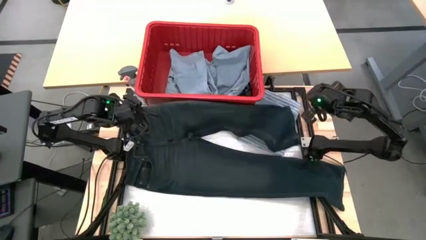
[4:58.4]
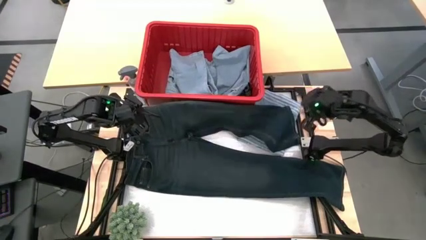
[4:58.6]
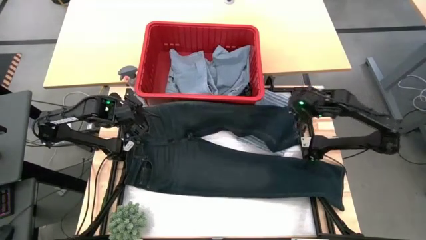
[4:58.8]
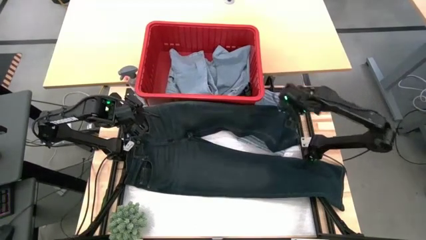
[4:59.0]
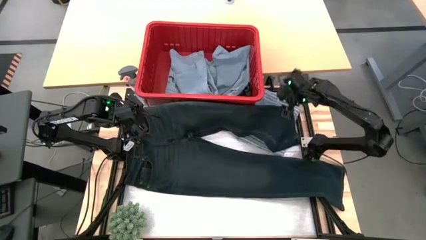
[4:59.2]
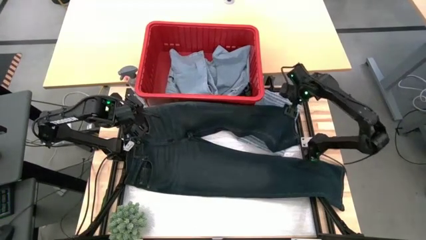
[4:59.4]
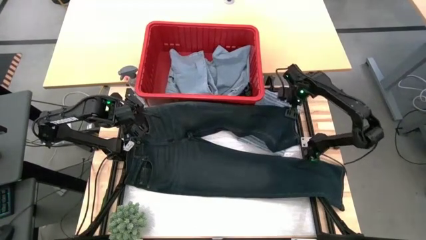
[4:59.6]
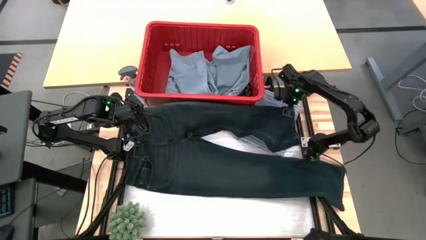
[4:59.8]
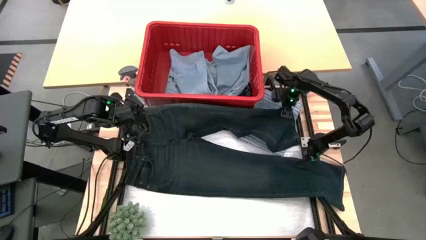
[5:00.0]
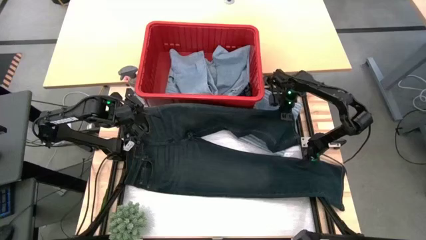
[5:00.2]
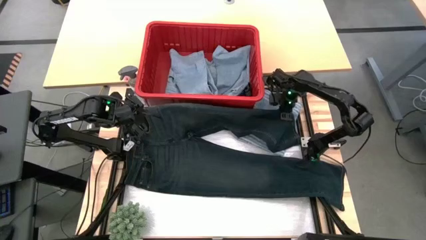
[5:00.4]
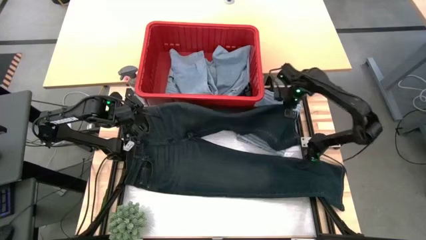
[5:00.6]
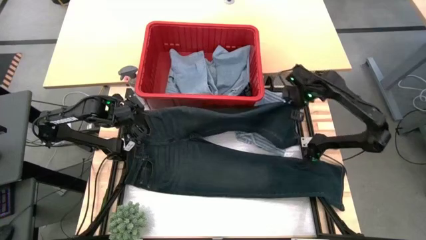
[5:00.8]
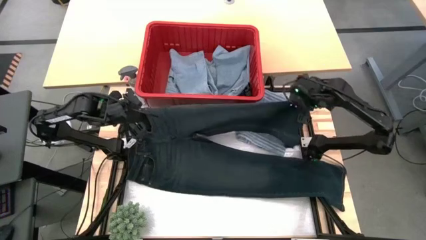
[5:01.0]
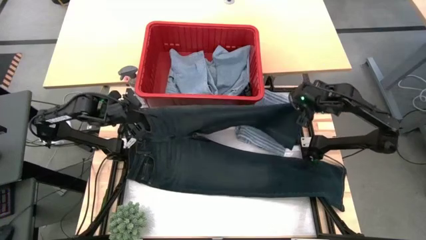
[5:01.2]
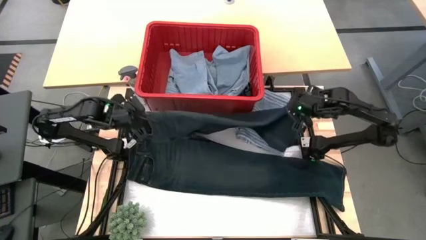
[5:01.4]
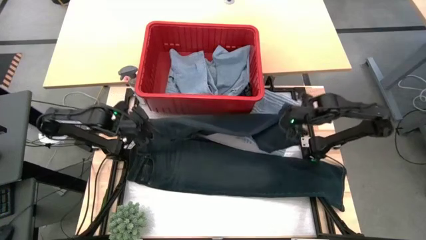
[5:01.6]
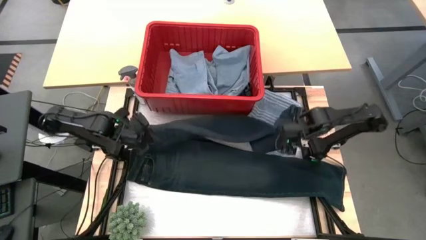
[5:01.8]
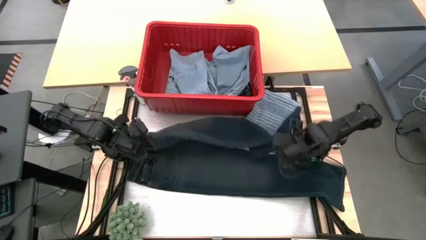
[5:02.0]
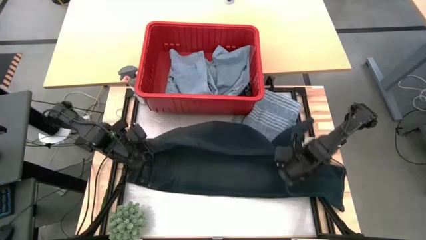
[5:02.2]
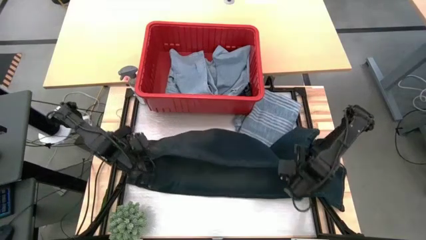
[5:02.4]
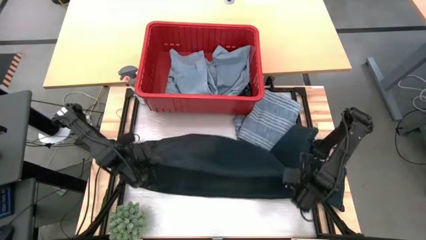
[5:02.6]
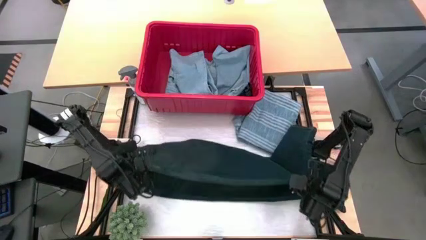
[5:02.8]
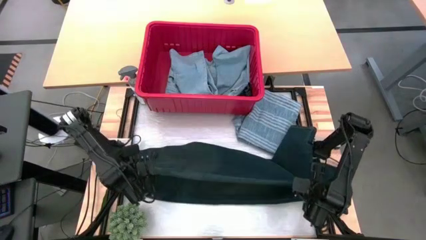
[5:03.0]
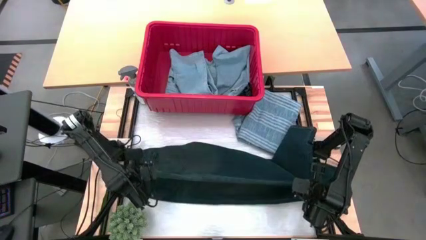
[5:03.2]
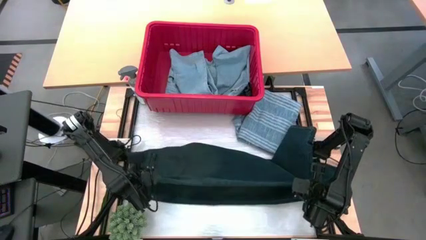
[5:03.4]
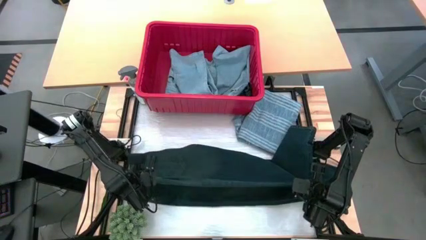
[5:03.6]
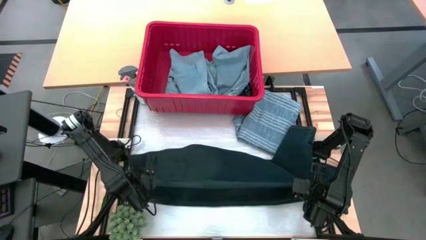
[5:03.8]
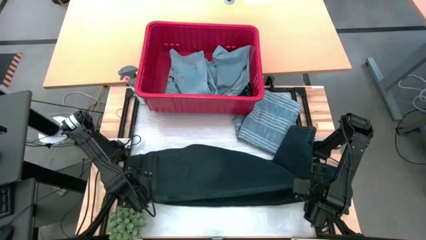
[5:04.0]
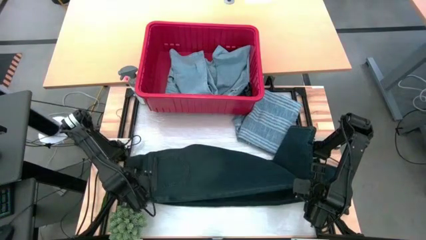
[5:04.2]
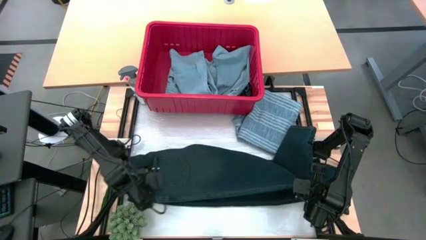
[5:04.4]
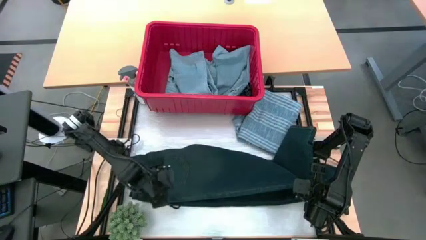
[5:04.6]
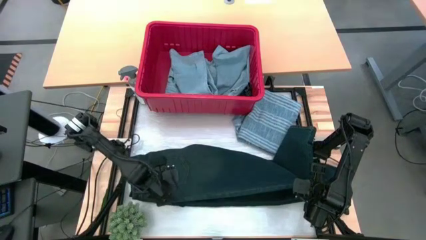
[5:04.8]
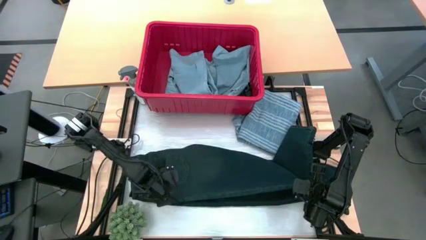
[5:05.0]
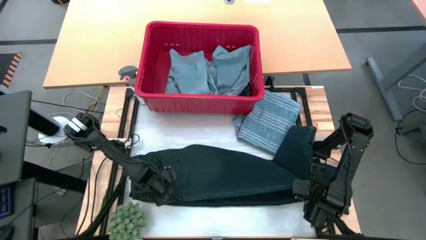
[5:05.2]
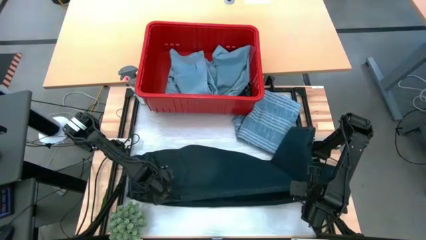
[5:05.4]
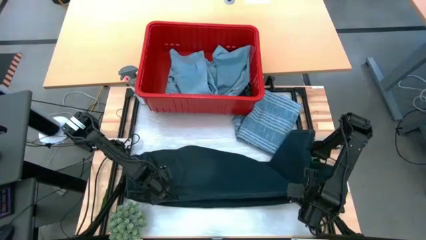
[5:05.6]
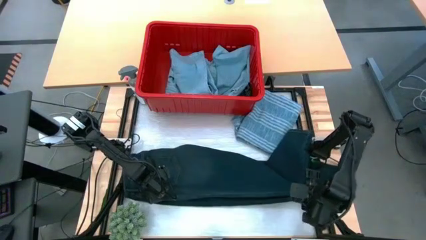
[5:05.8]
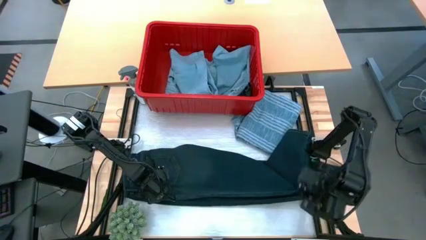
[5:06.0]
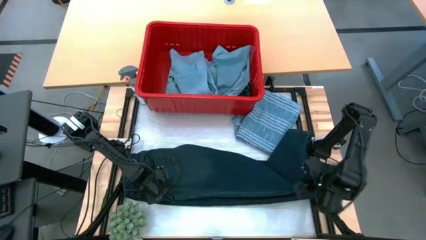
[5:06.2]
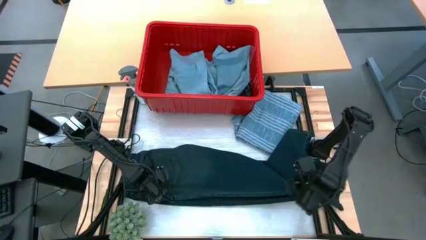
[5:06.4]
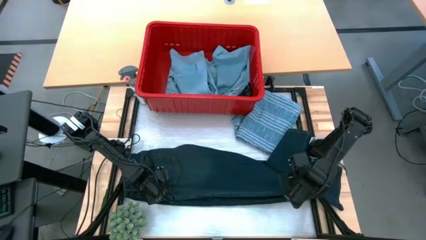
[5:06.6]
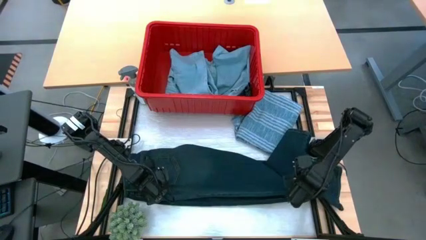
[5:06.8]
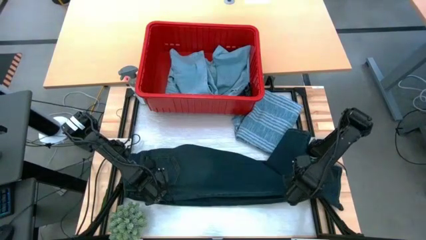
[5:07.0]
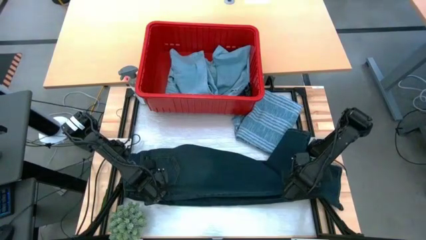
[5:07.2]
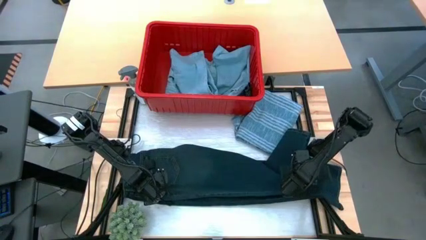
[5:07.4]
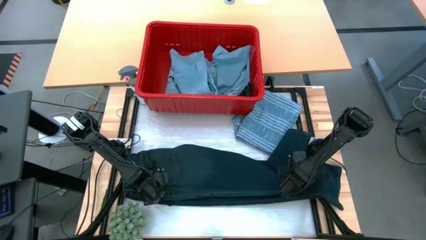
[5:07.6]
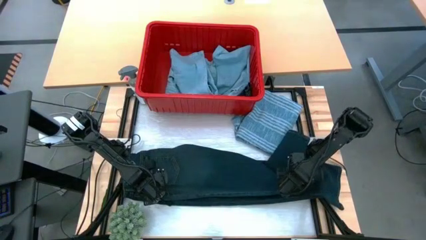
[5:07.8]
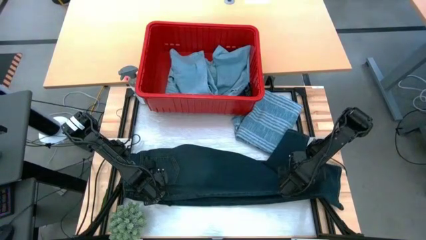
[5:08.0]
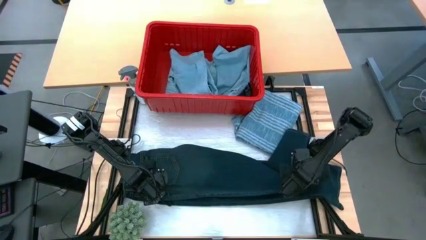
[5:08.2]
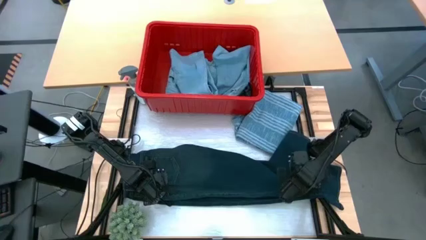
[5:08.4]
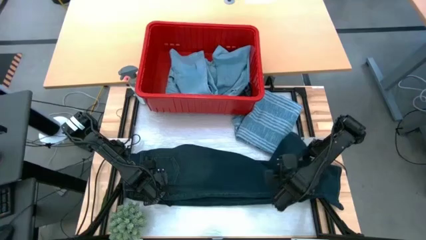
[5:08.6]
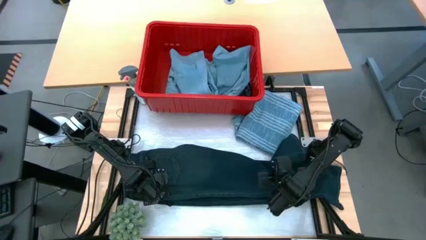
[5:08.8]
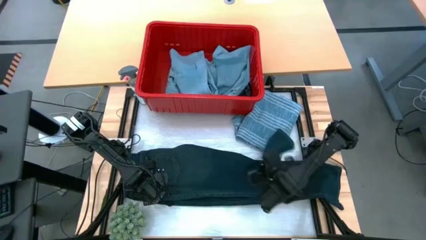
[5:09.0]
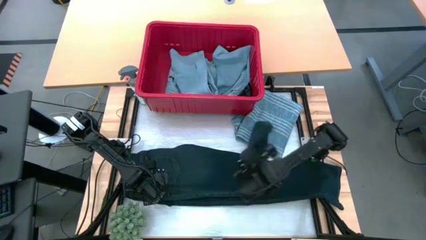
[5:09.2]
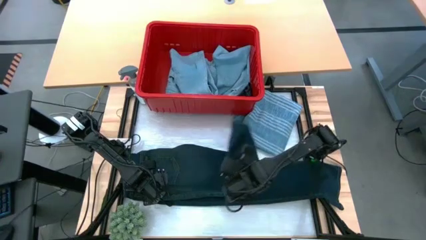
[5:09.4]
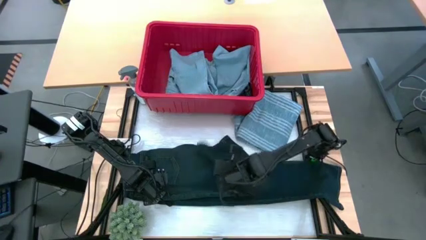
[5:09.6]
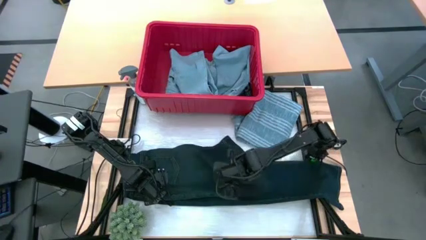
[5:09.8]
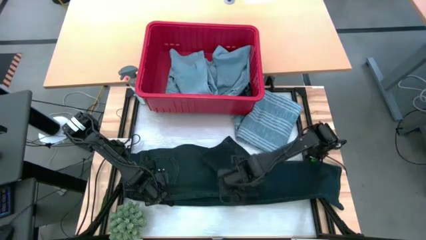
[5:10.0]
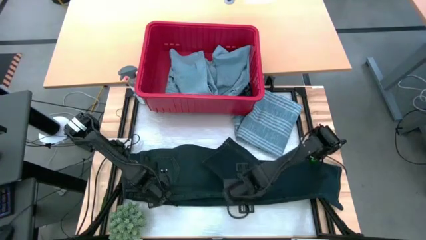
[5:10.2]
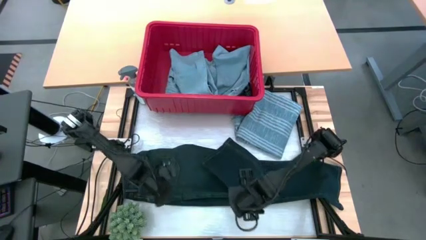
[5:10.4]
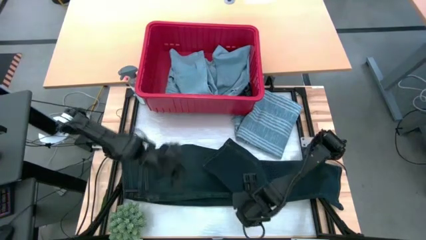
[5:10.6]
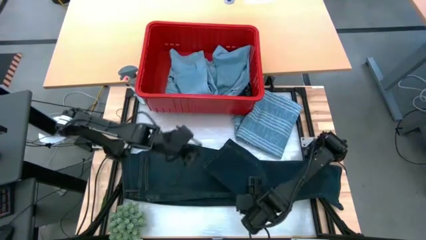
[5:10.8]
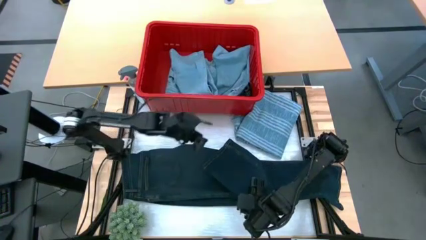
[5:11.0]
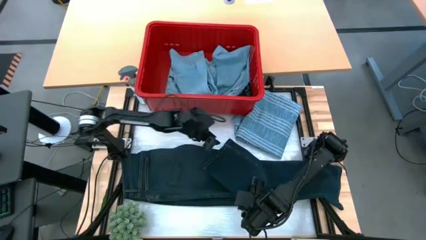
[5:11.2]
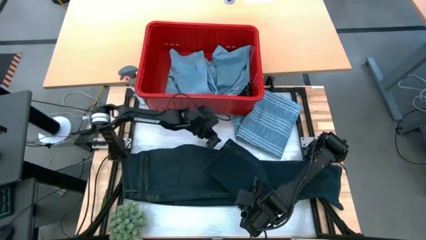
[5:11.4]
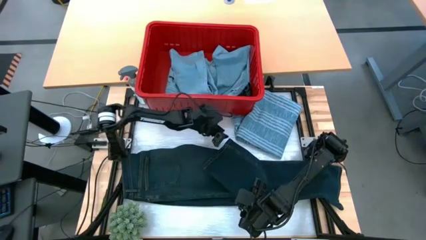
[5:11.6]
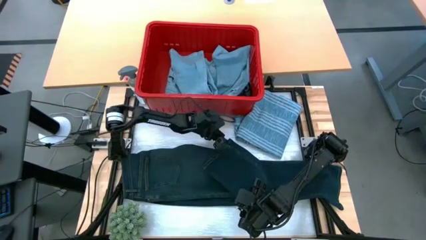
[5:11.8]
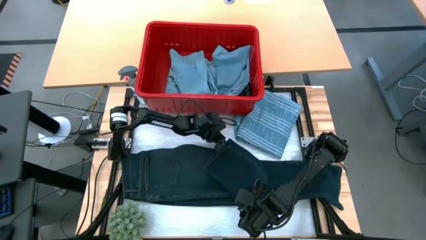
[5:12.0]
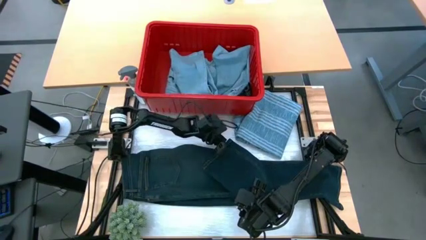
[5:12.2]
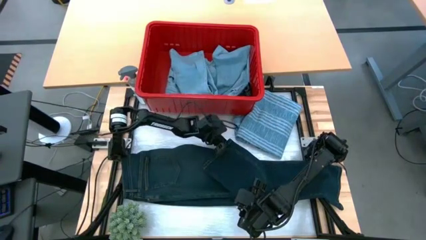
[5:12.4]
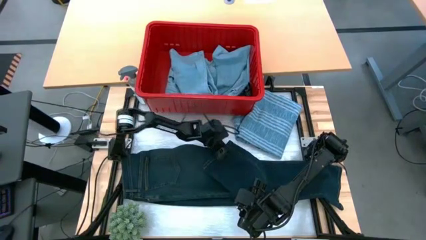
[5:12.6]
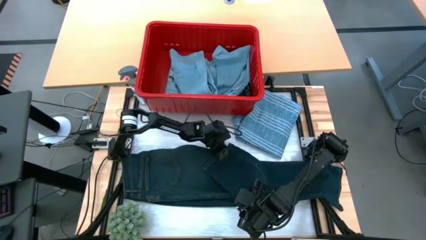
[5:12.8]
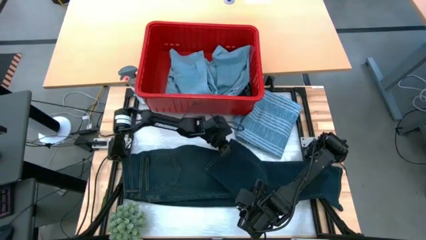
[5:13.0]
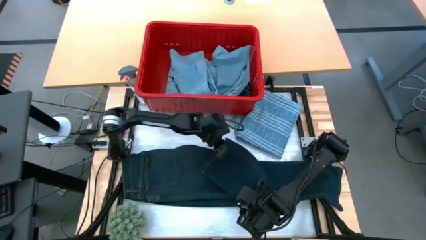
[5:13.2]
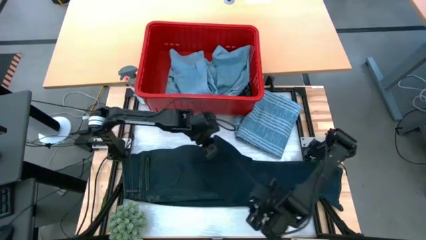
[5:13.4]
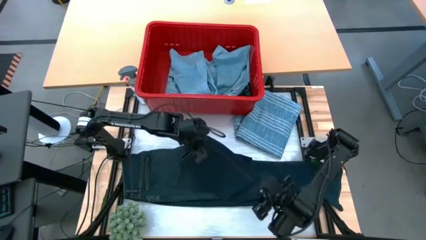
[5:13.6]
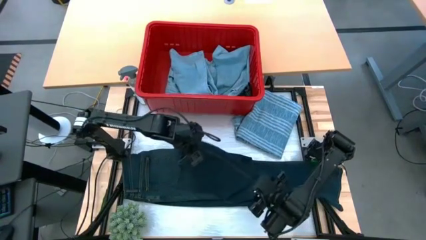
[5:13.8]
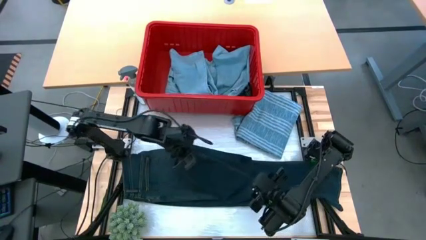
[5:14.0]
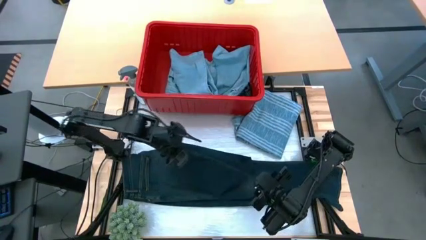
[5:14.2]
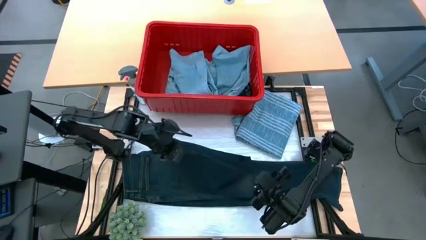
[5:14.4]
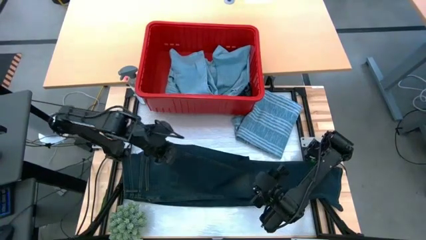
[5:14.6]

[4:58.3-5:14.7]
Task: Fold Laundry from Bin
Fold the black pants
